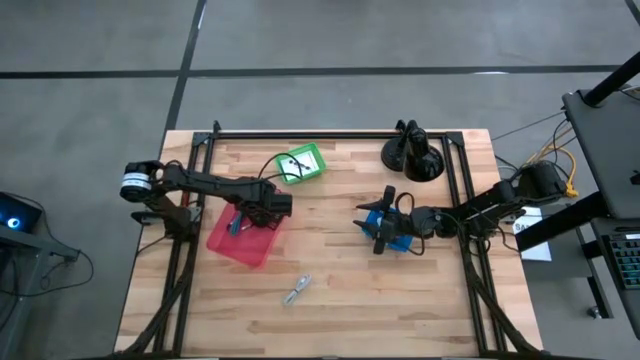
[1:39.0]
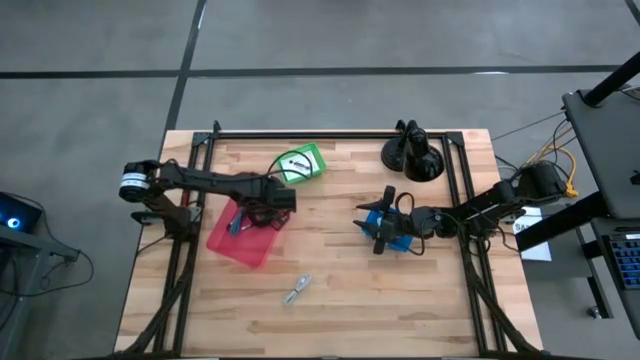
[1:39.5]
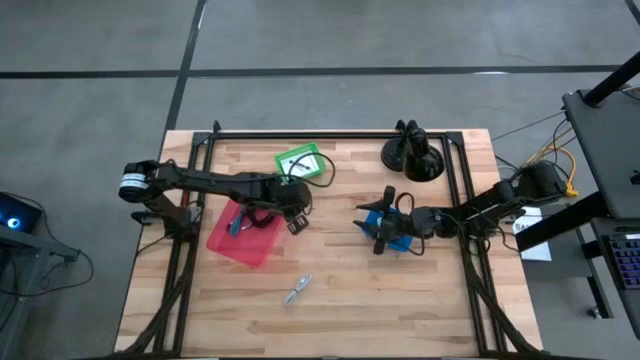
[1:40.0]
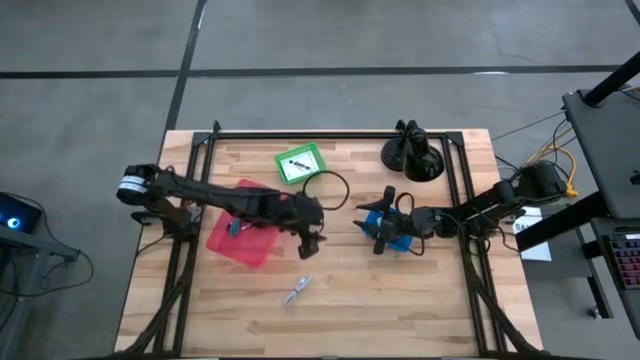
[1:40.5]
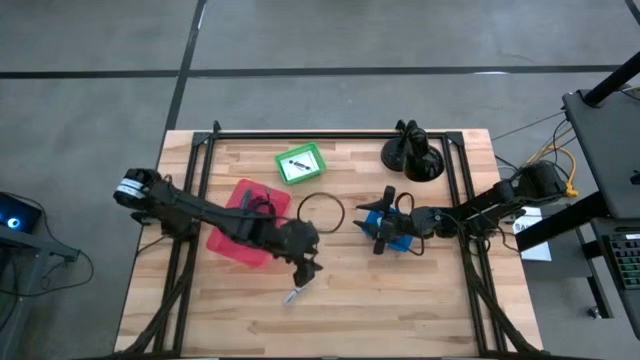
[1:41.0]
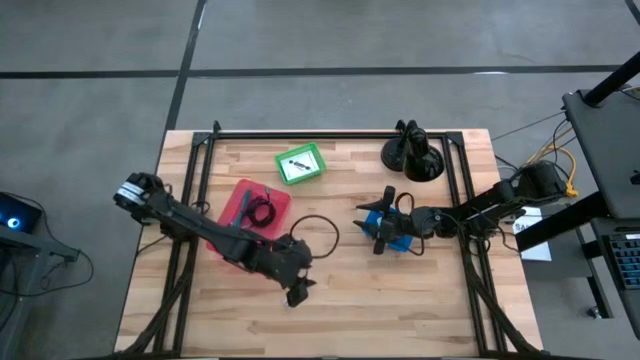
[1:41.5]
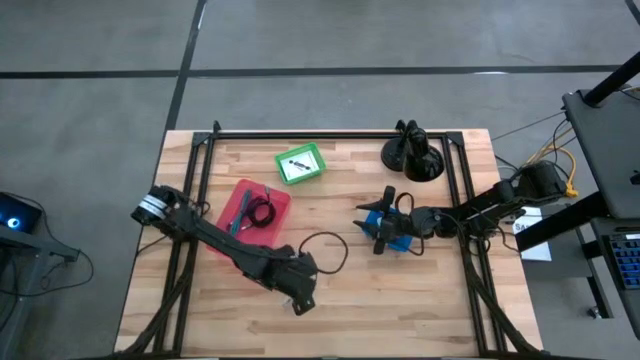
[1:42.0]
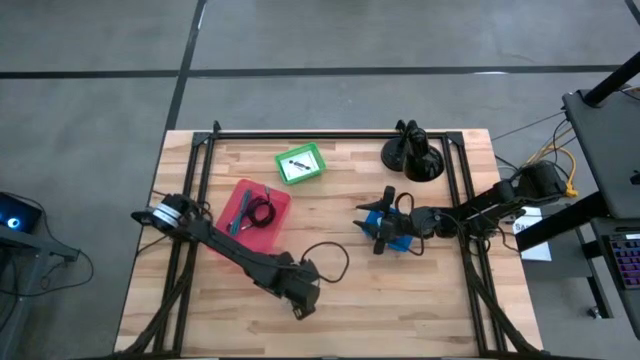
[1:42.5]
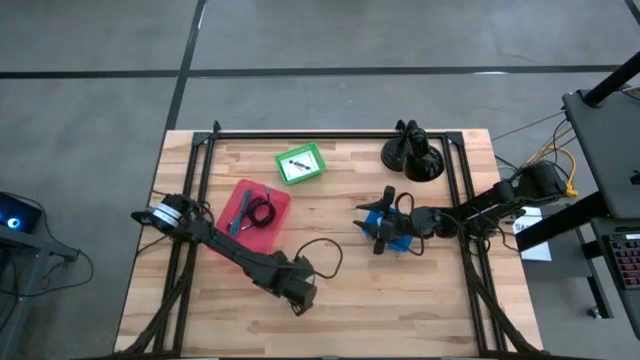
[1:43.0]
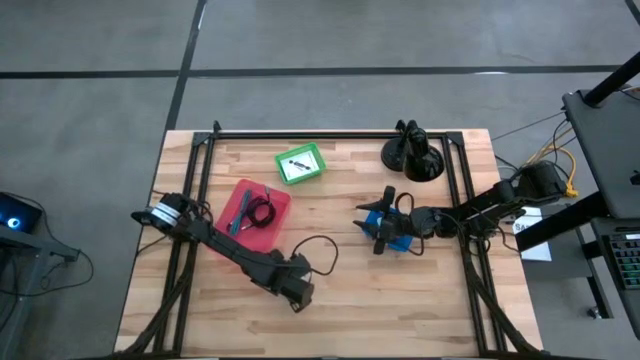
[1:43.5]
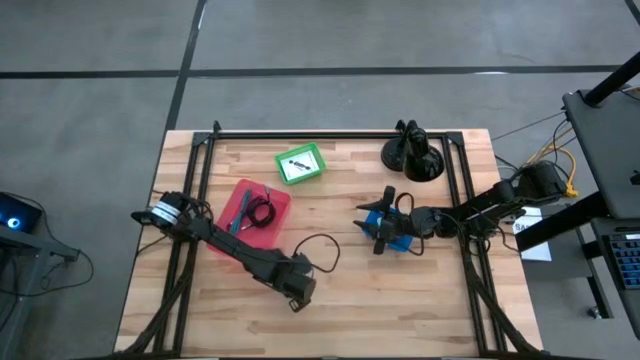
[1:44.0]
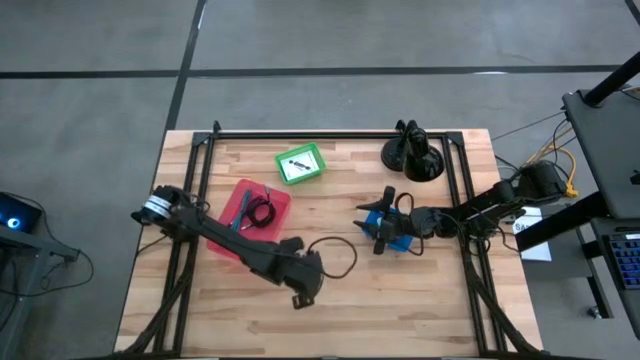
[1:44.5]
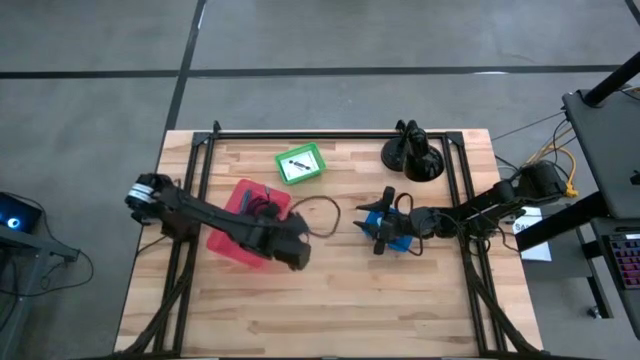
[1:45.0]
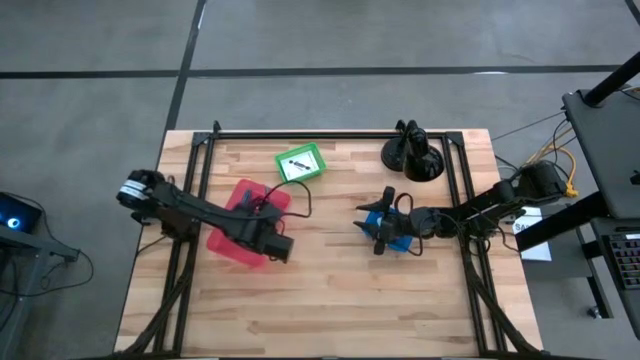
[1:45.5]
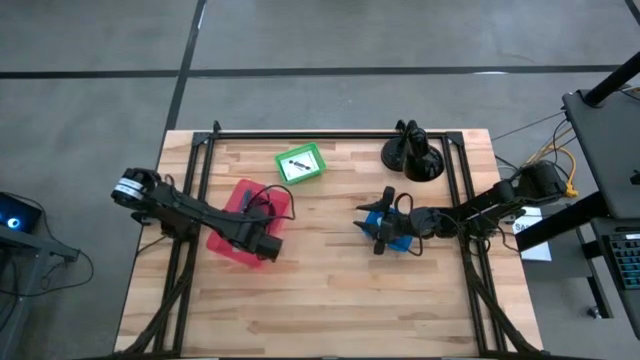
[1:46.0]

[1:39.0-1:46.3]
Task: Pick and place items into bin
Put the white charger cable into the pink bin

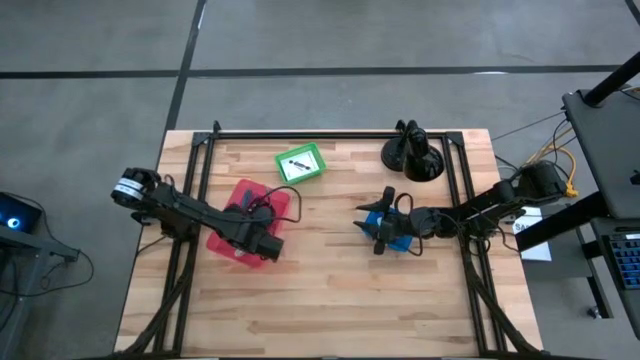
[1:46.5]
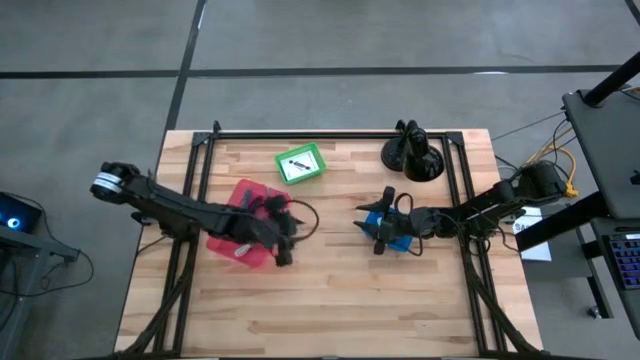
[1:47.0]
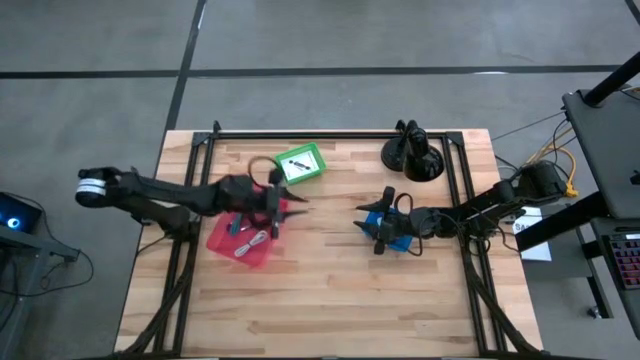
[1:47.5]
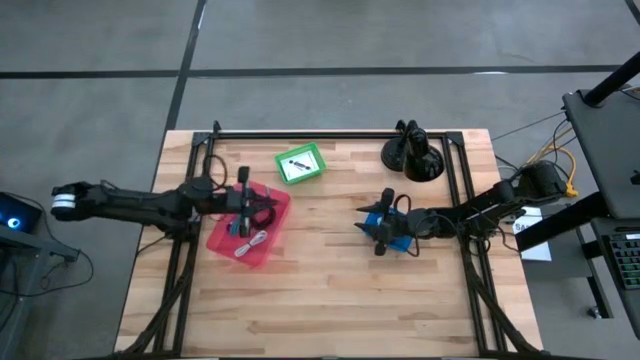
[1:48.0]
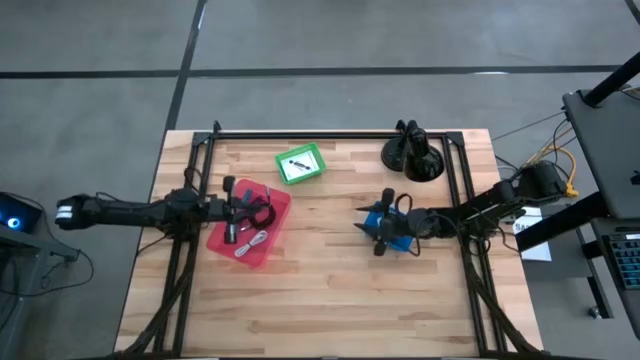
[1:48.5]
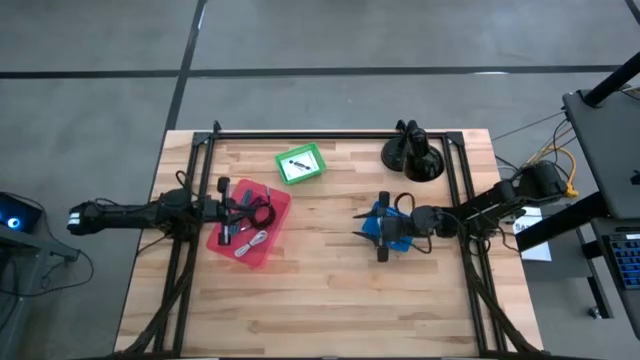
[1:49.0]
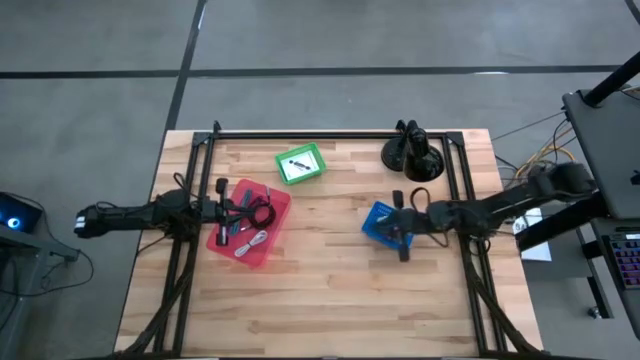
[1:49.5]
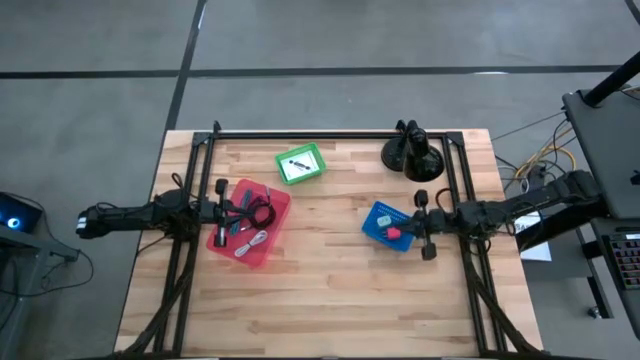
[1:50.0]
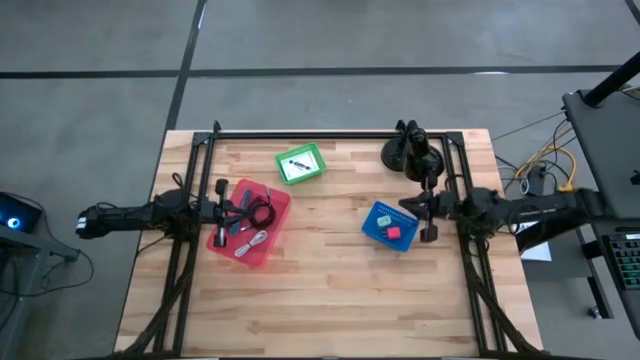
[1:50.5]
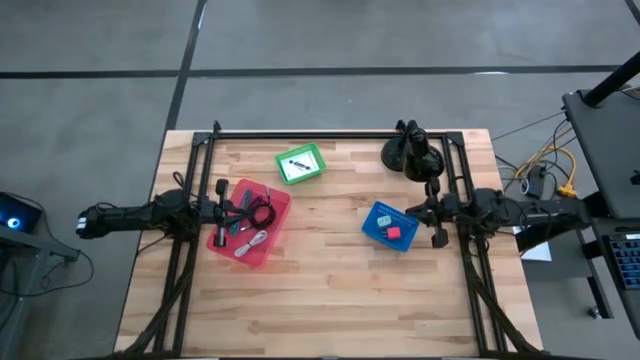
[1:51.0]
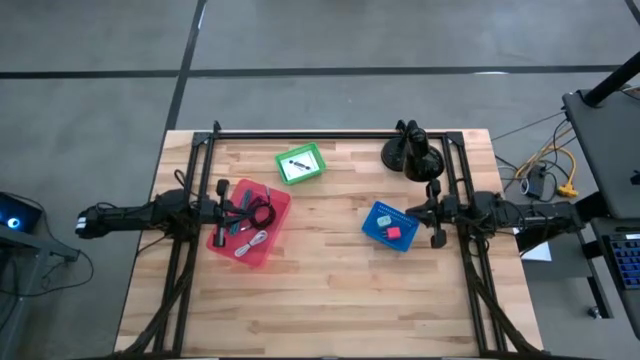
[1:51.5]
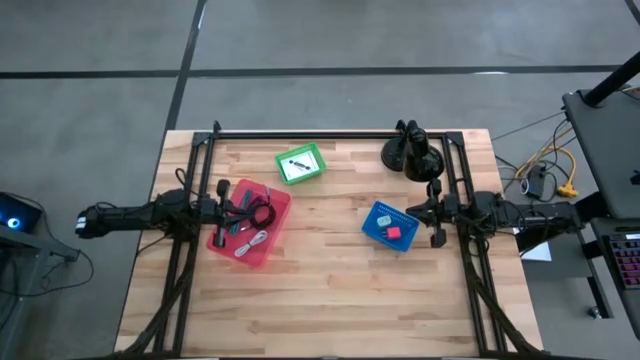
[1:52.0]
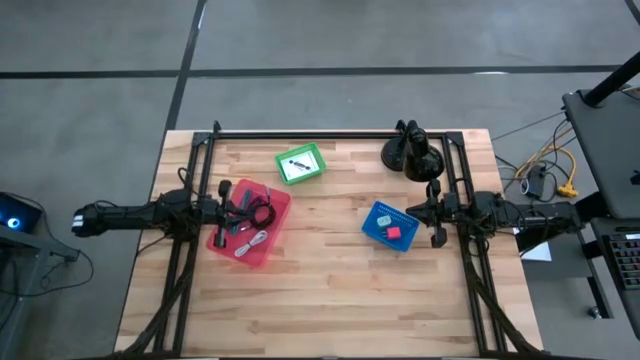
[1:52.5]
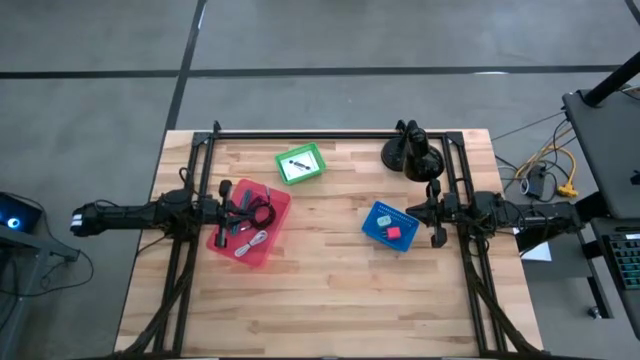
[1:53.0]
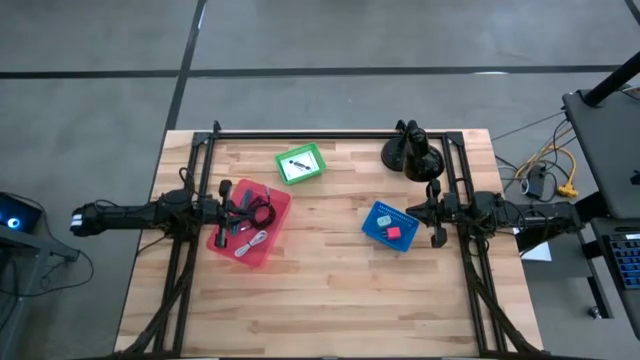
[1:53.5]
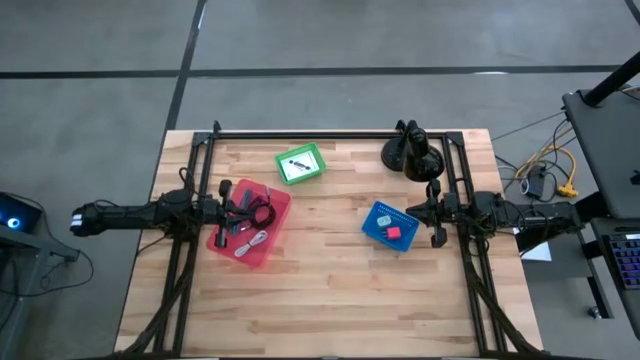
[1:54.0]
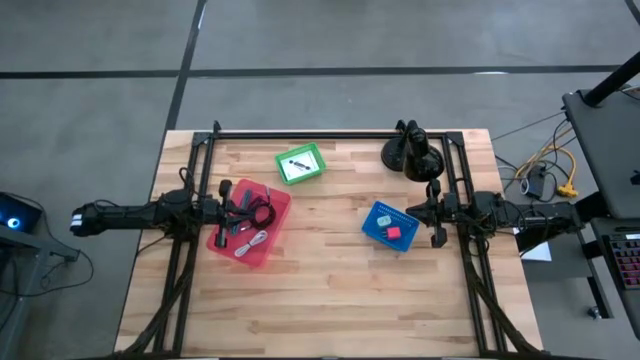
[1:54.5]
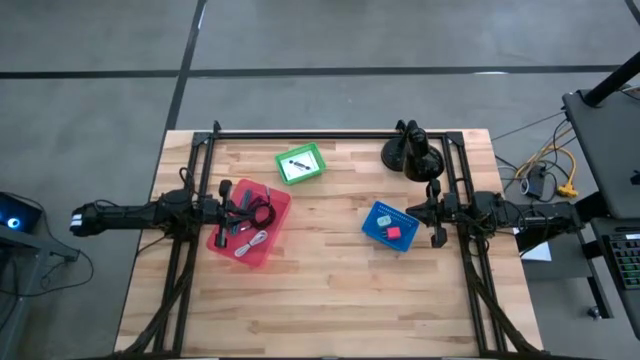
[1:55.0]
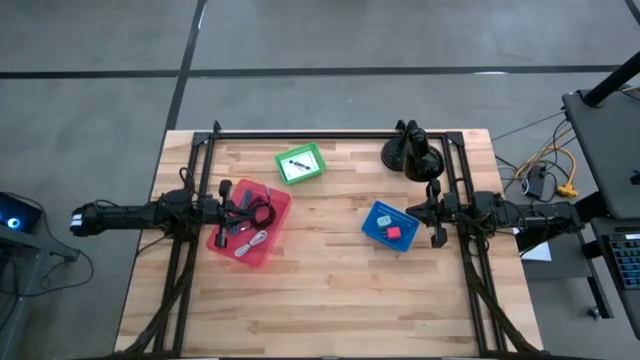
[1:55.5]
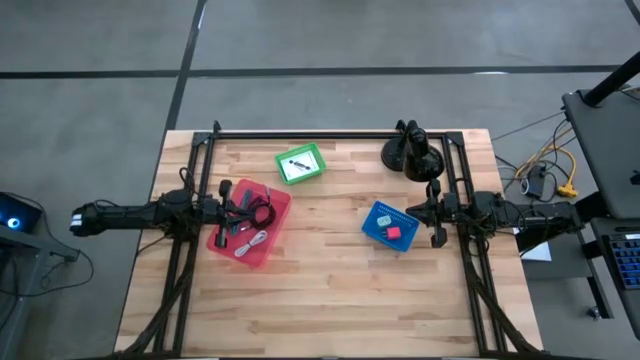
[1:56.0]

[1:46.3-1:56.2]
Return to Home Position

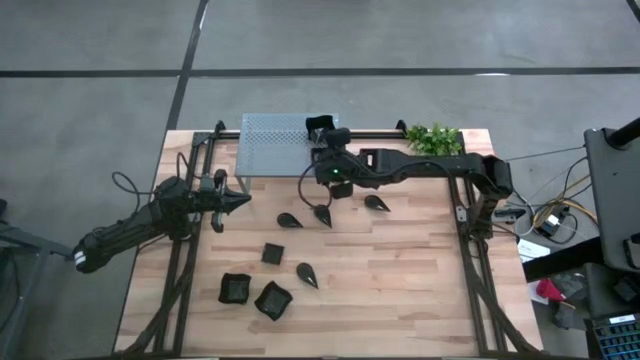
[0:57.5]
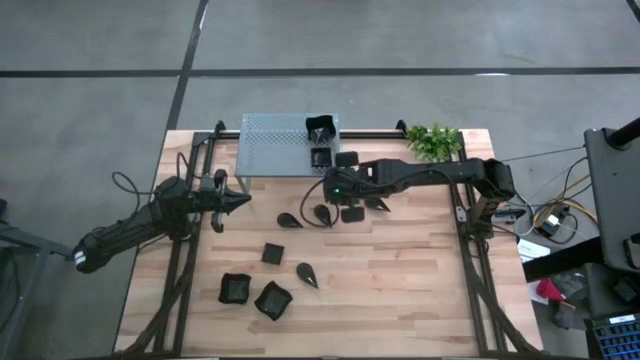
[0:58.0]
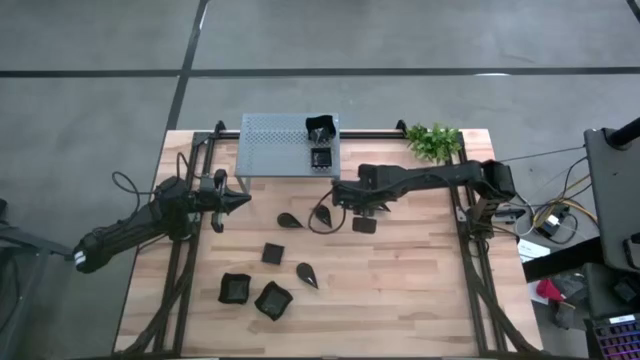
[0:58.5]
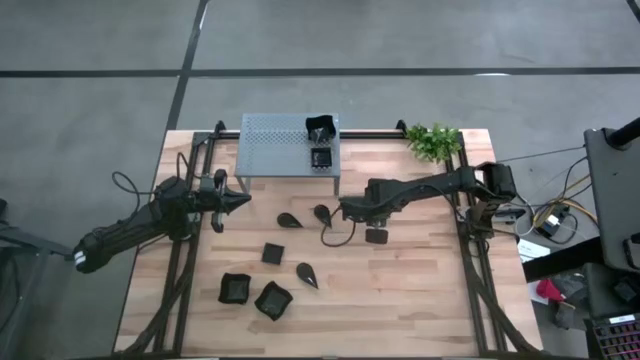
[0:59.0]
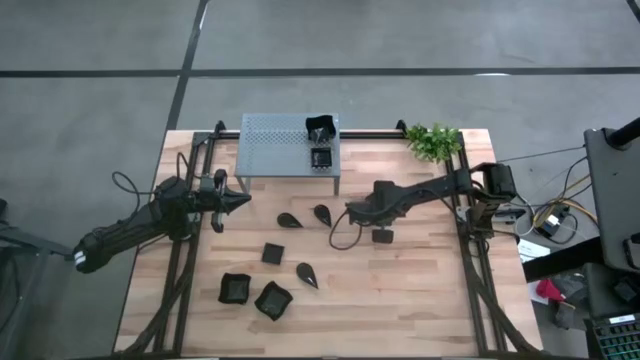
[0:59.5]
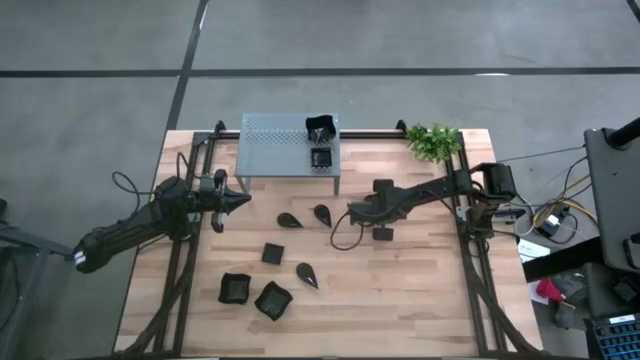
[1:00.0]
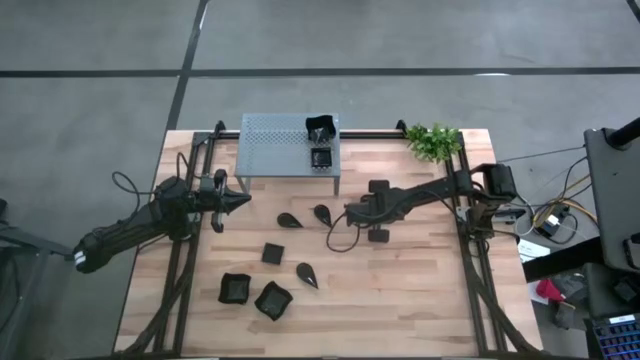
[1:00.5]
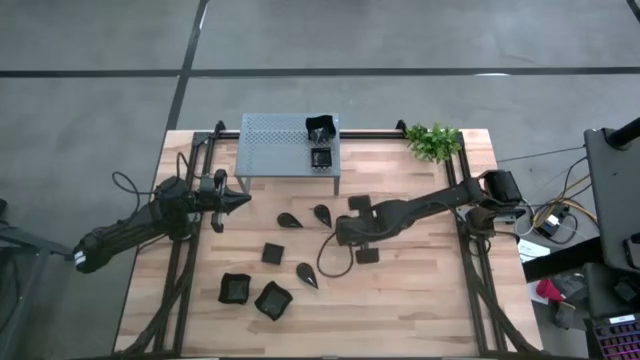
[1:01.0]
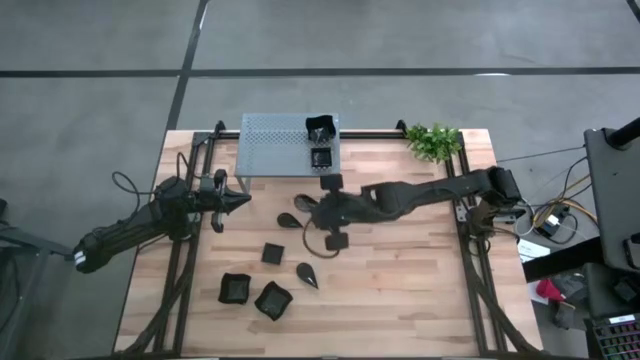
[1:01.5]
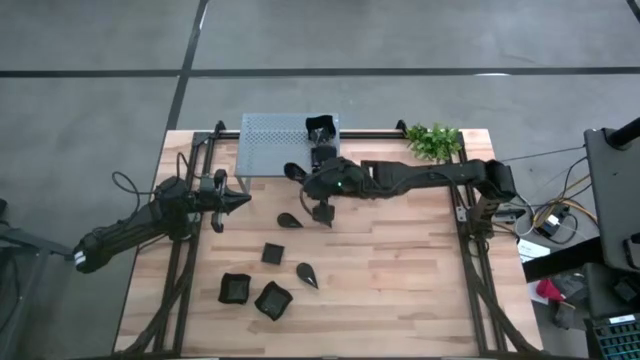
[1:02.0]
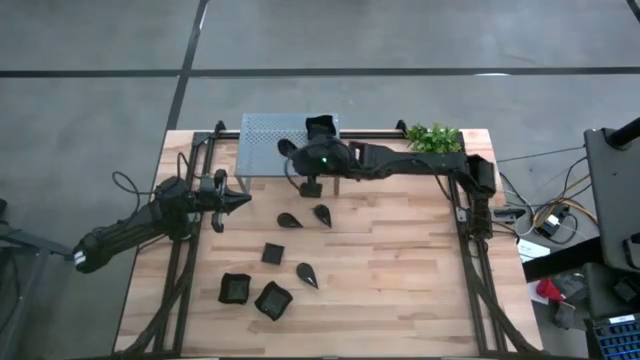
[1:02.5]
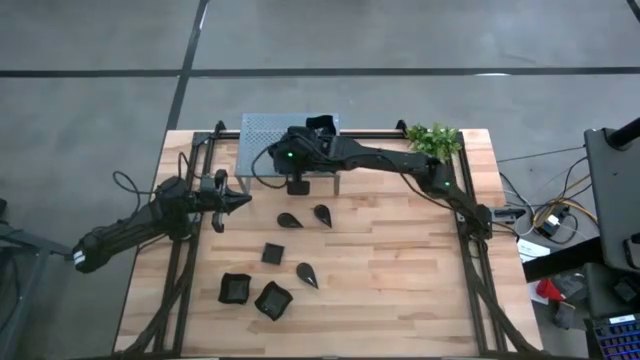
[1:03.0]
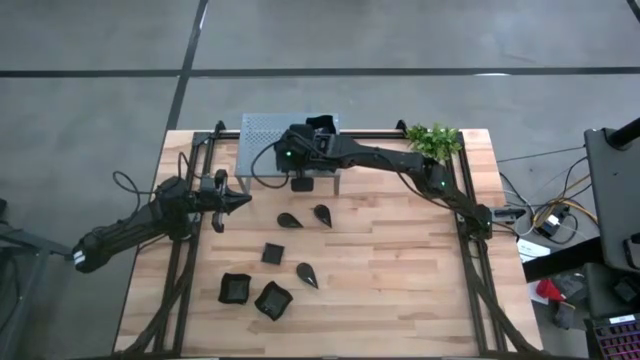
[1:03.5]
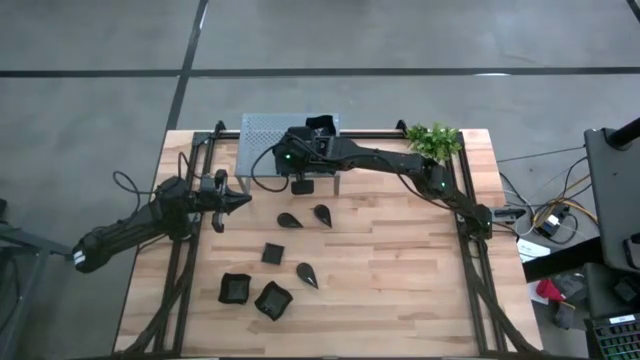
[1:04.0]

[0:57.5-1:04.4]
Task: Pick & Place Mini shaped plates
Put the black drop shaped plate on the shelf
